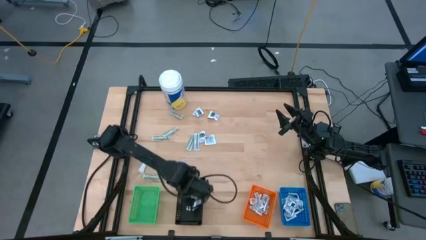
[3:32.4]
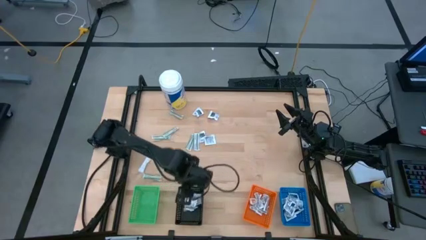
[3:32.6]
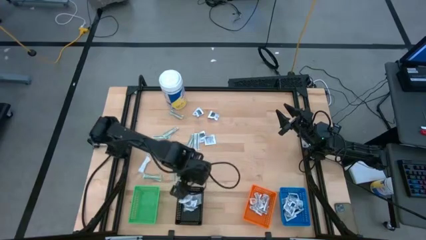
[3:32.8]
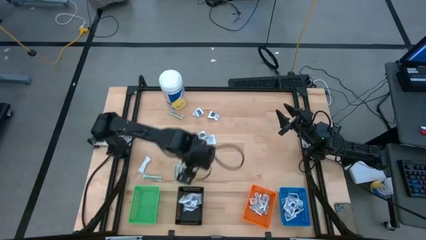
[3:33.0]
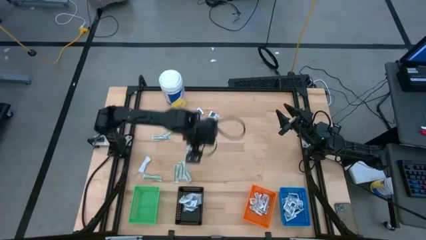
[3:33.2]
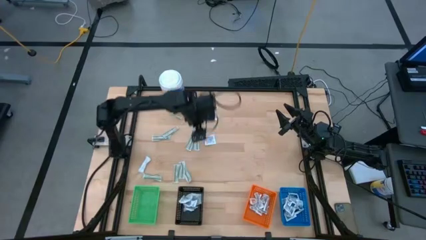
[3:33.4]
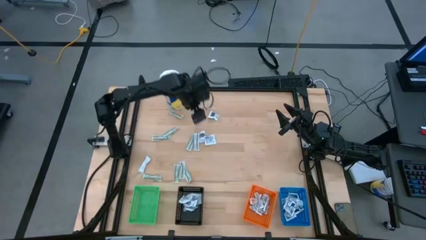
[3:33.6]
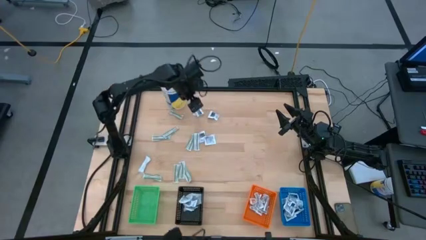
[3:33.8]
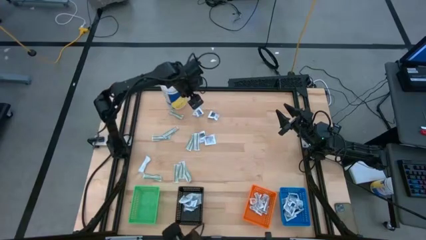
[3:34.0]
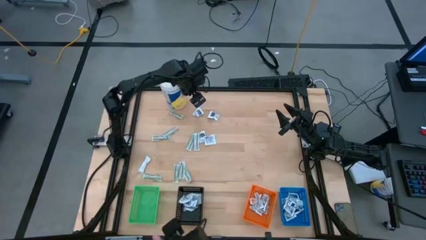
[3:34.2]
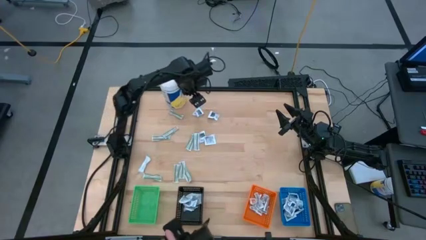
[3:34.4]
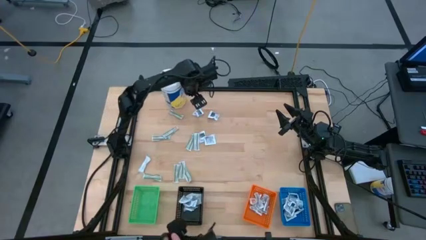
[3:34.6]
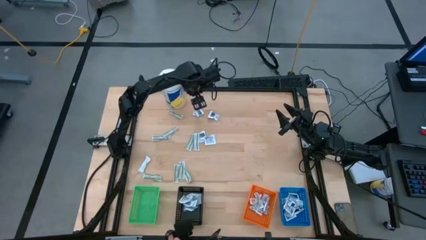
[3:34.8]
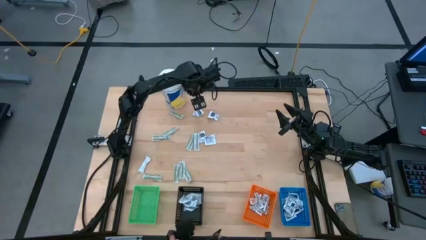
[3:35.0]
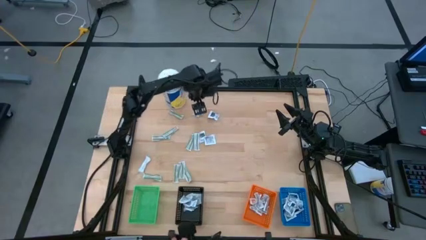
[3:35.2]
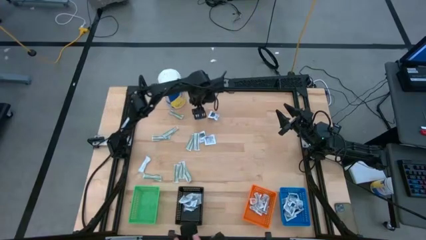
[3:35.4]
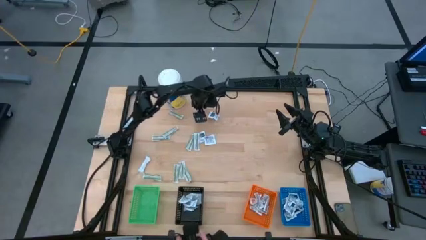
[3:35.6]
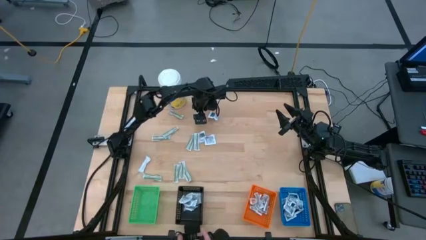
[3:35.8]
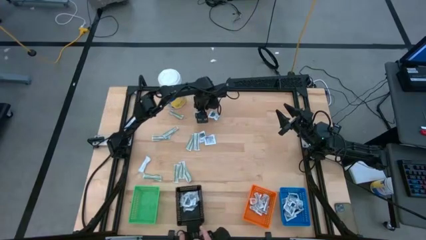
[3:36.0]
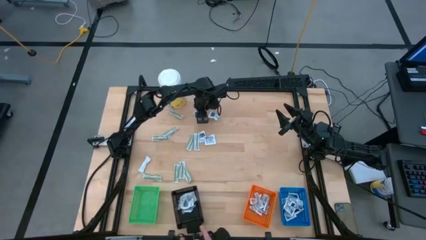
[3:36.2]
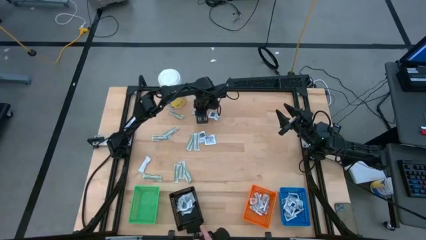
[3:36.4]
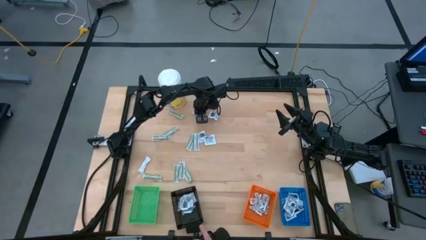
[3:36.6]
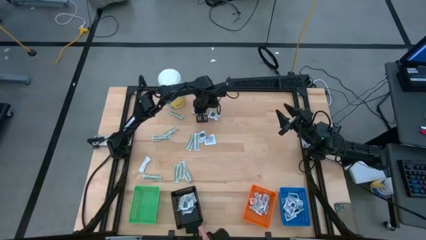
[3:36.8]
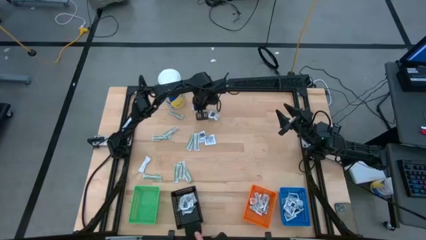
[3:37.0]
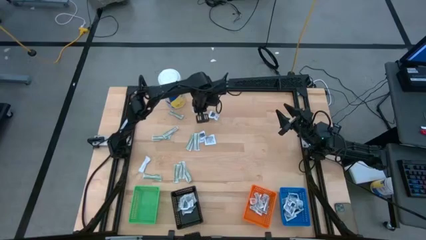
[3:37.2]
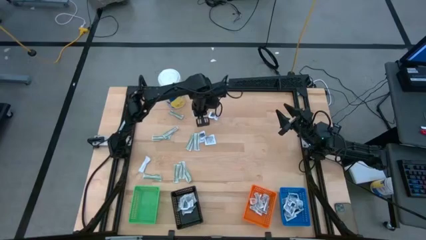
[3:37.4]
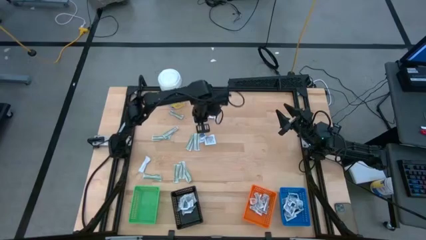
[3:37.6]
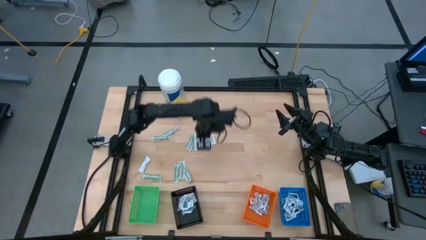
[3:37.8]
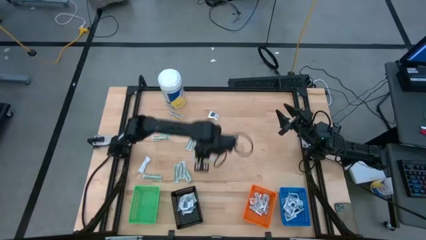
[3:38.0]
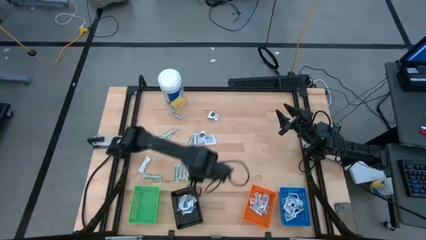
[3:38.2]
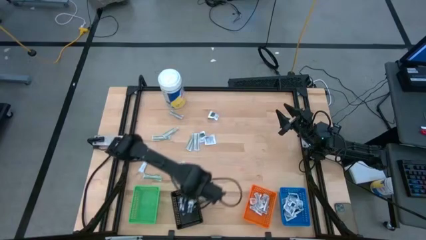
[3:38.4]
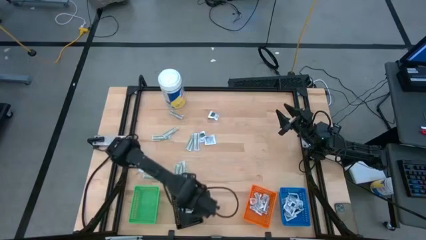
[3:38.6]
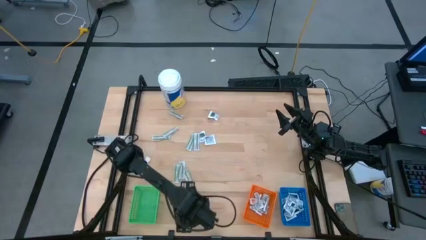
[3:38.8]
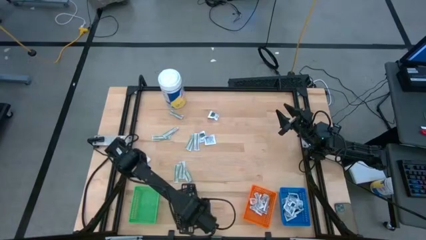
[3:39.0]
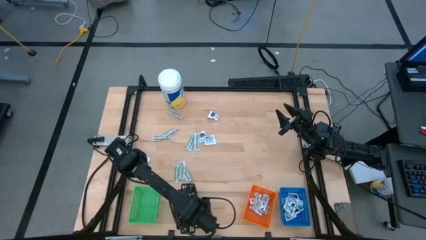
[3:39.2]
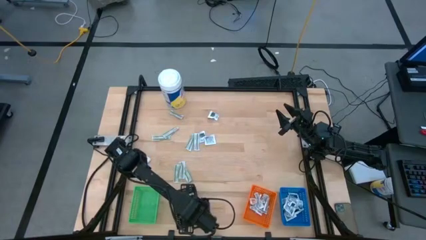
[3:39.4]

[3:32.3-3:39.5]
Task: Pick & Place First Aid Supplies
Put the towelette pack into the black bin

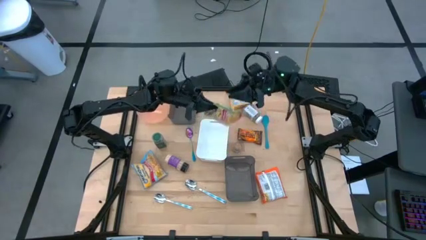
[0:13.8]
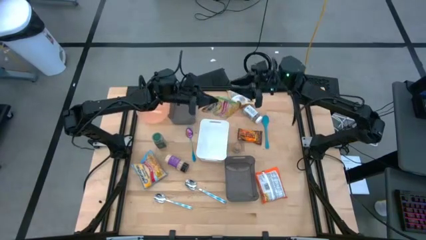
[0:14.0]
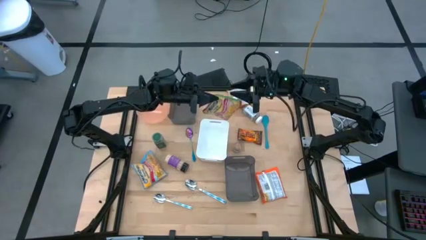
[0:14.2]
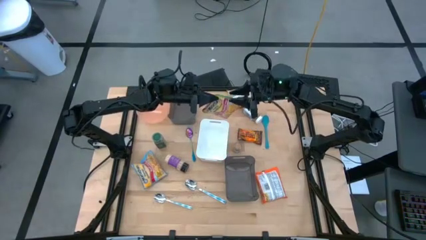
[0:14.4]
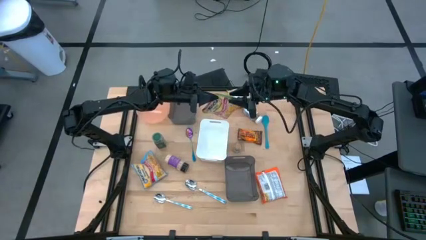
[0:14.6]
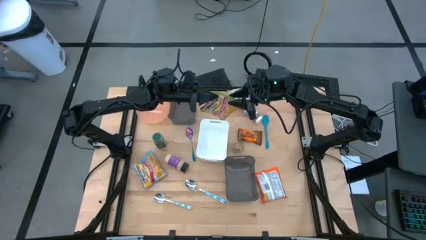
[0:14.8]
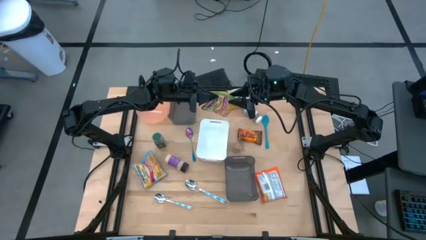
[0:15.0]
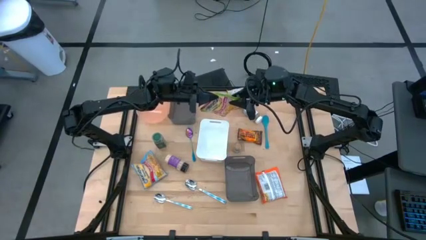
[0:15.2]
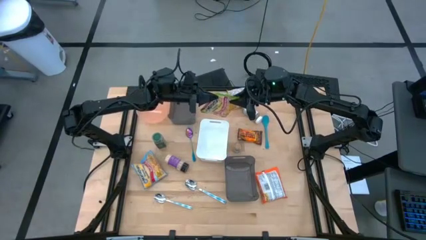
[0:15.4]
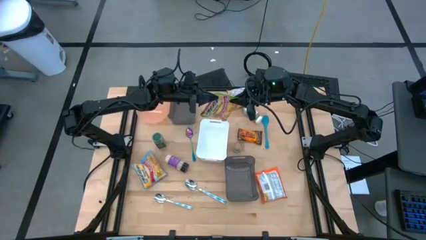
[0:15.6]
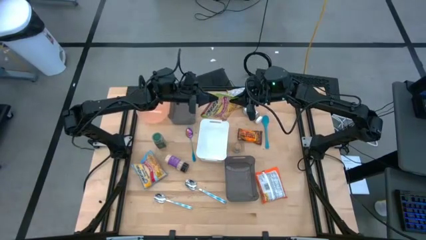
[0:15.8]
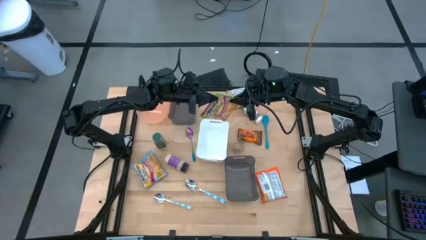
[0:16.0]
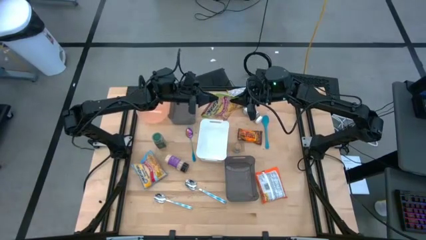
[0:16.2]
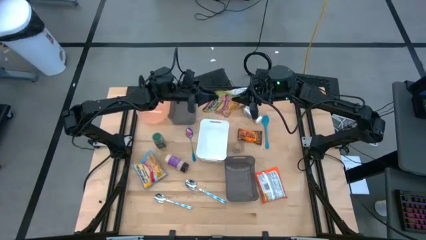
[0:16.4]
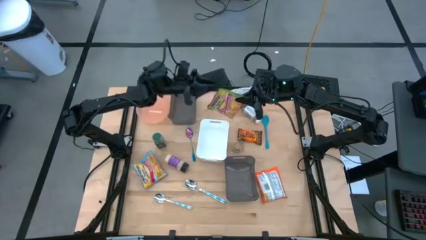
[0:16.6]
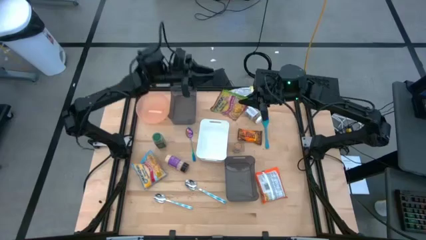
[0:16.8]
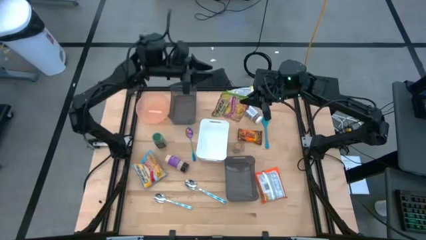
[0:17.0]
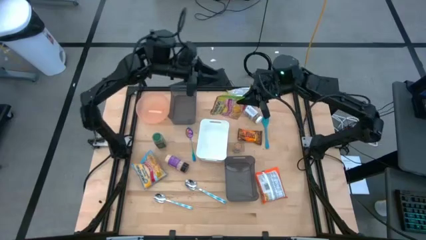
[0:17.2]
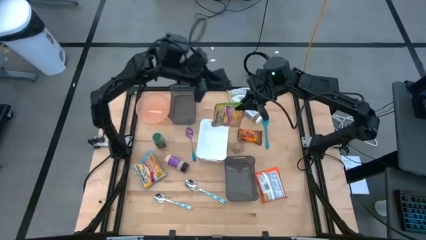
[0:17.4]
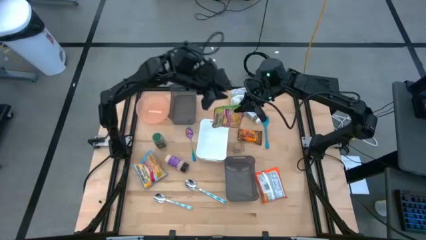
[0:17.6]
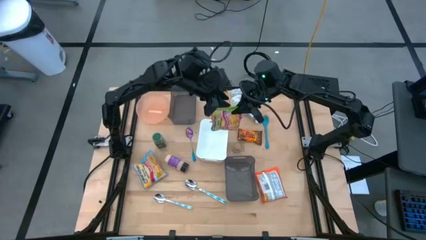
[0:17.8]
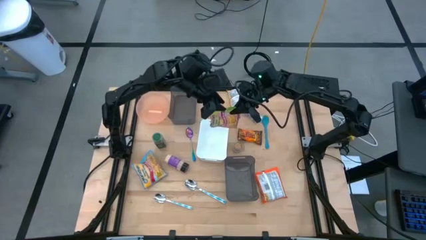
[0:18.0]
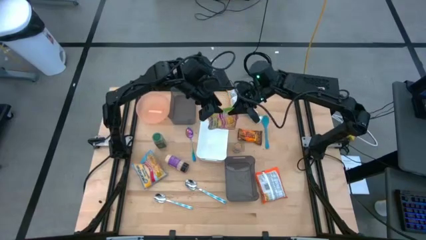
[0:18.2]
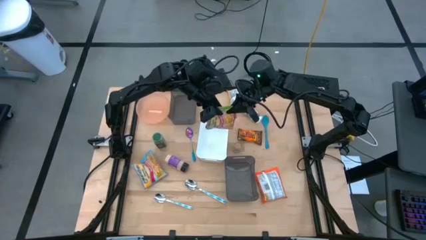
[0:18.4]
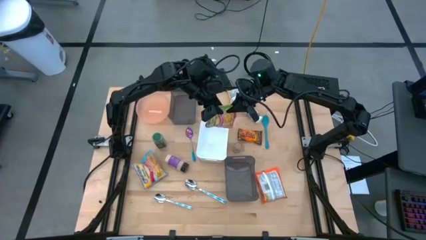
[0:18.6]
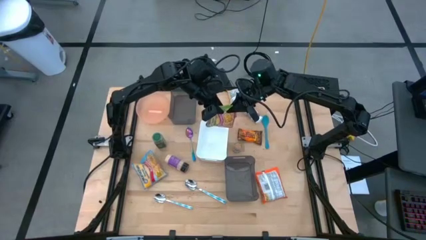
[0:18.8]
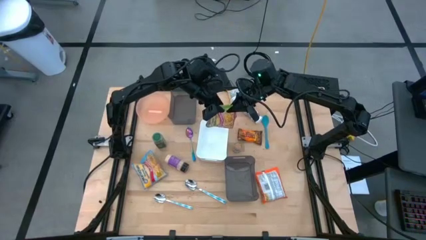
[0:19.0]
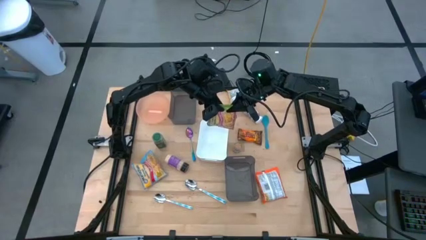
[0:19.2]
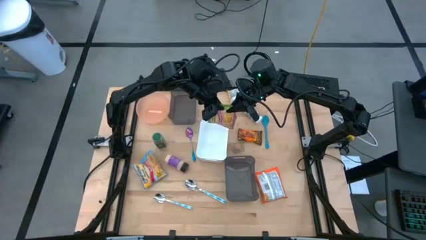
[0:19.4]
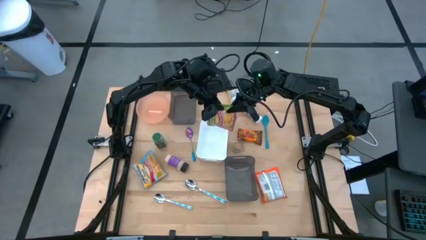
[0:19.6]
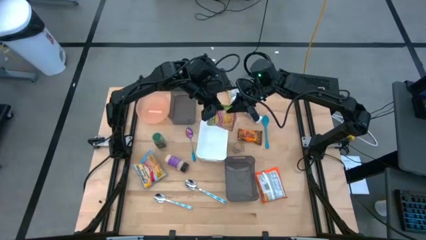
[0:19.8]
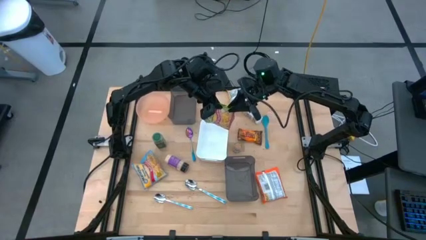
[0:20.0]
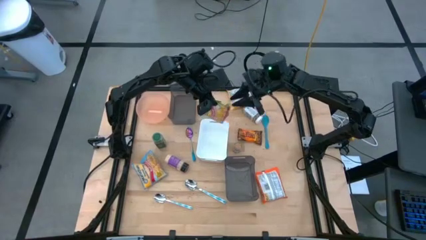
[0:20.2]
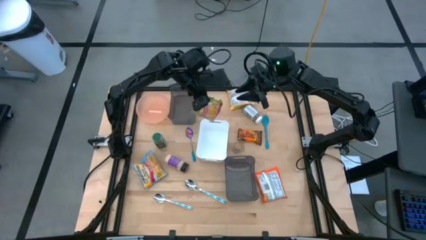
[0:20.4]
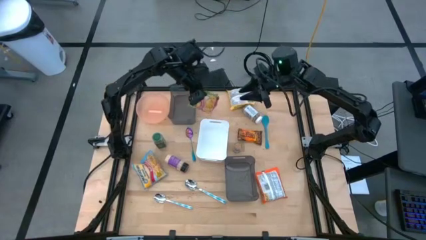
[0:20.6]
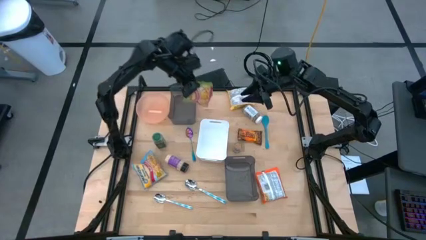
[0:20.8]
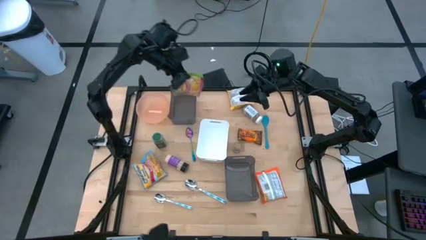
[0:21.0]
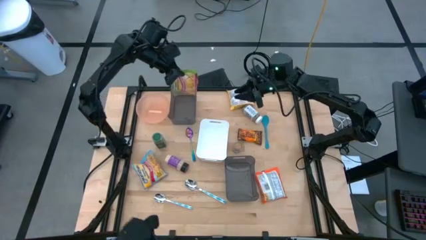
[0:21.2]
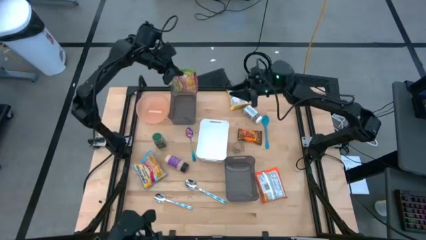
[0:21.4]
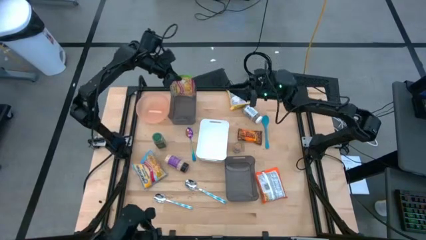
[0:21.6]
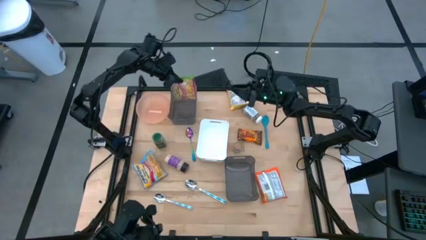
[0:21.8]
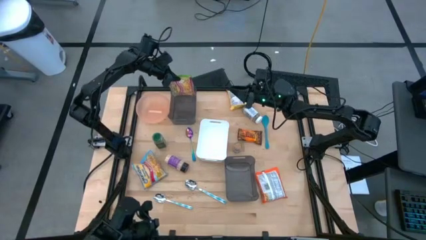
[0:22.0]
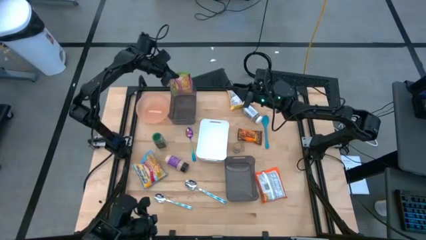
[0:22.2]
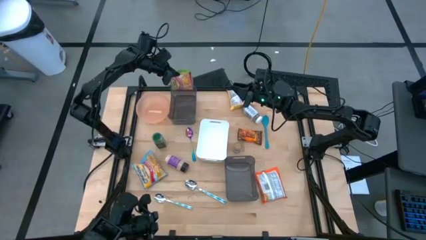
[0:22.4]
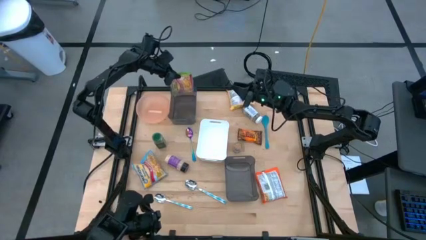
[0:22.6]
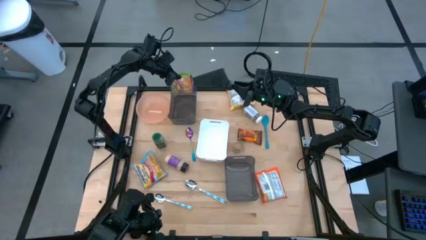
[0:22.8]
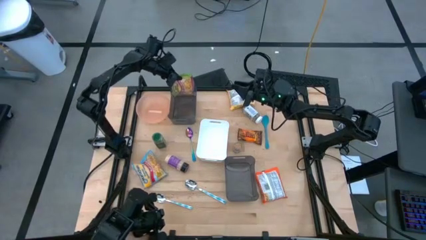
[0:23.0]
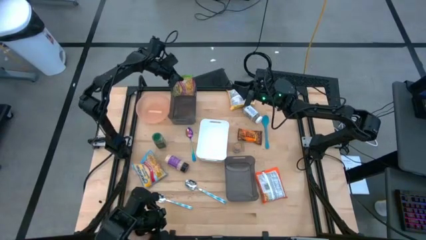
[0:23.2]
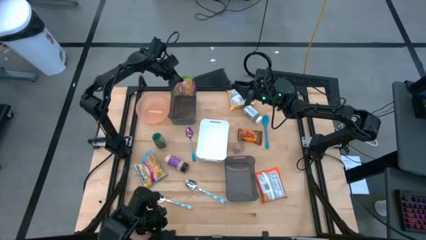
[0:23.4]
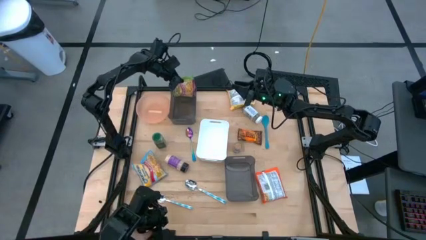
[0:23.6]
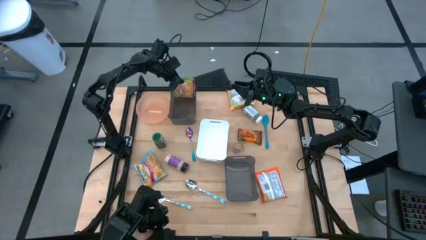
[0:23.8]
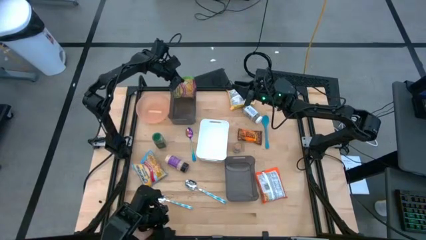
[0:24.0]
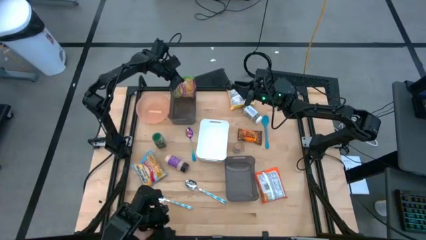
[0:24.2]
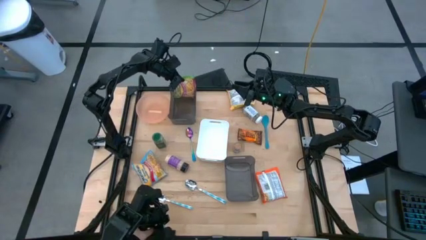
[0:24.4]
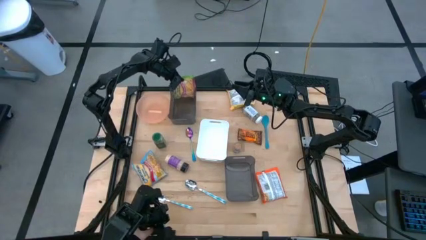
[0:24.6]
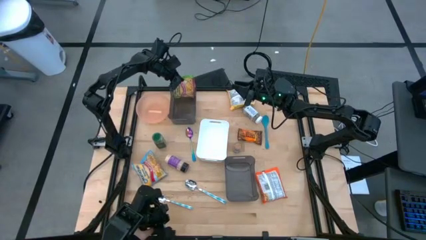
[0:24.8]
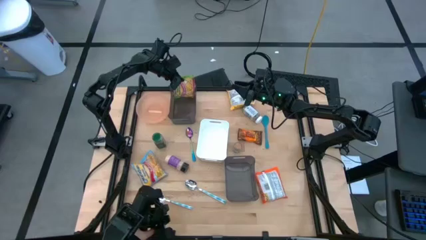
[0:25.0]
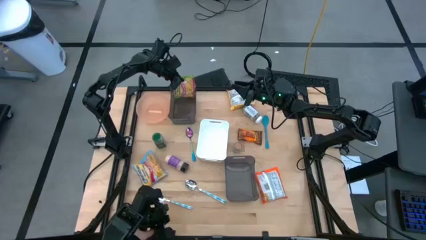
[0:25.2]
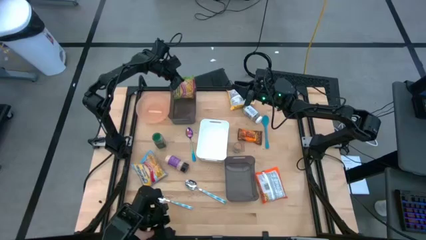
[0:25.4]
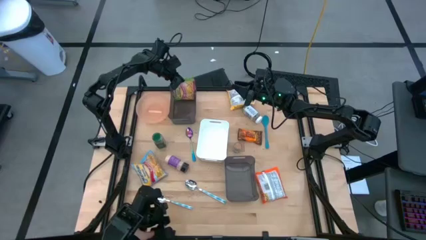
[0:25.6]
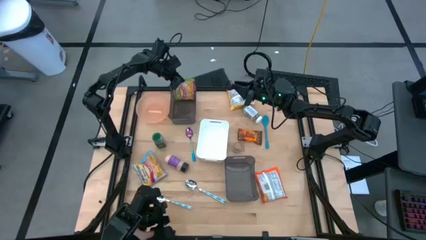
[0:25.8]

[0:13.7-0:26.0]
Task: Pick & Place Food Item
Put the green noodle pack into the top black bin
